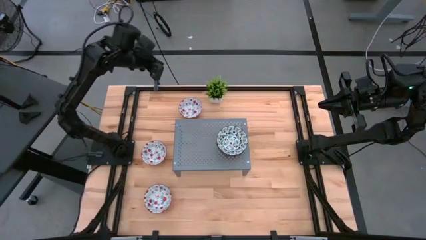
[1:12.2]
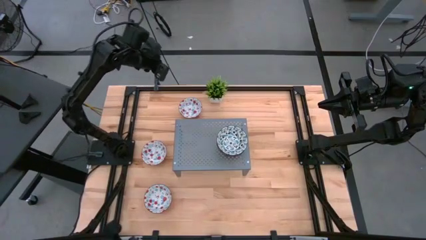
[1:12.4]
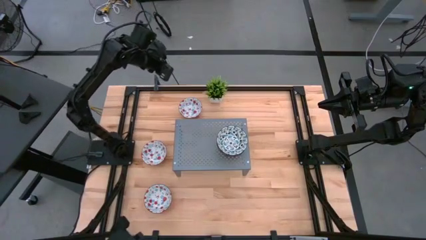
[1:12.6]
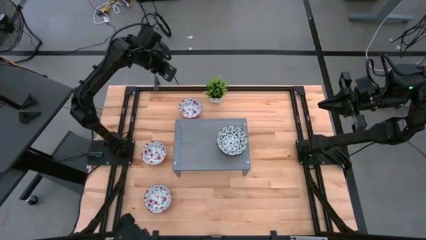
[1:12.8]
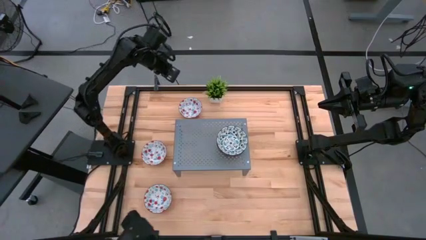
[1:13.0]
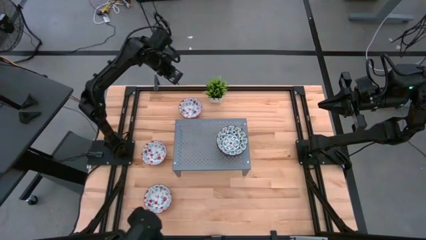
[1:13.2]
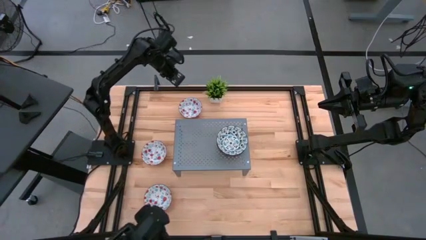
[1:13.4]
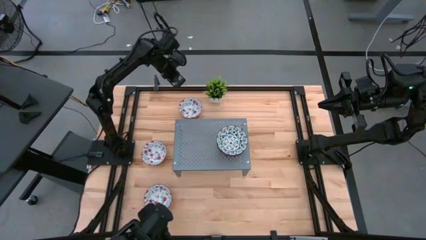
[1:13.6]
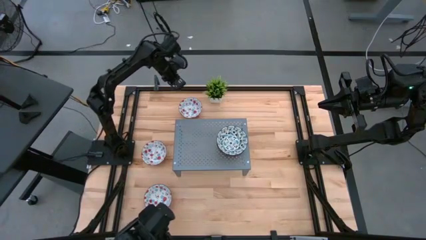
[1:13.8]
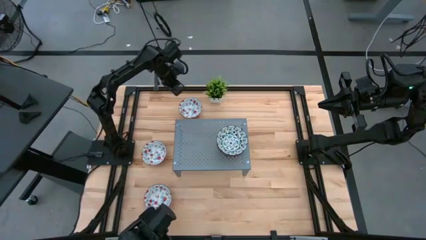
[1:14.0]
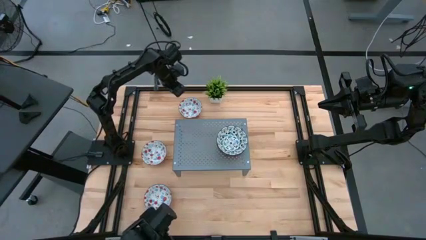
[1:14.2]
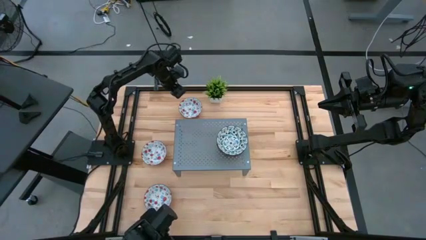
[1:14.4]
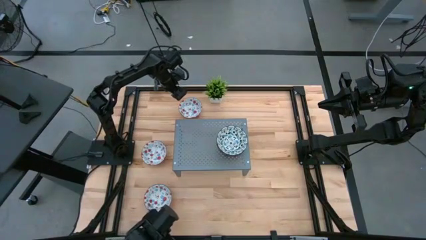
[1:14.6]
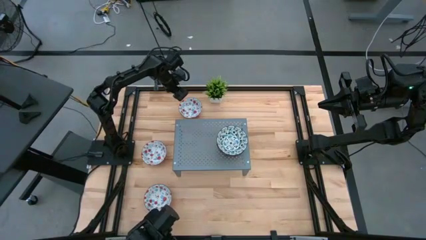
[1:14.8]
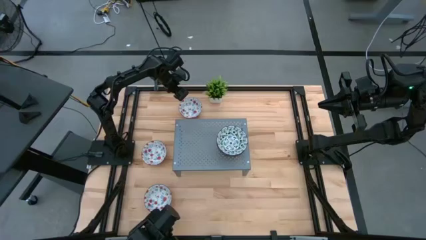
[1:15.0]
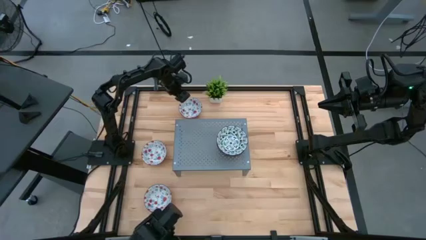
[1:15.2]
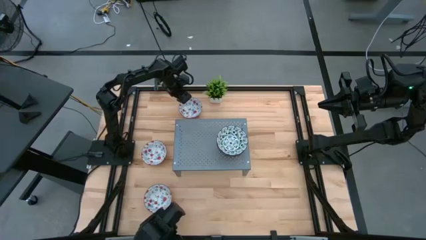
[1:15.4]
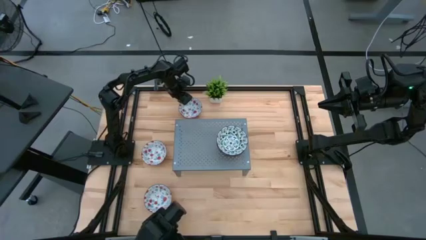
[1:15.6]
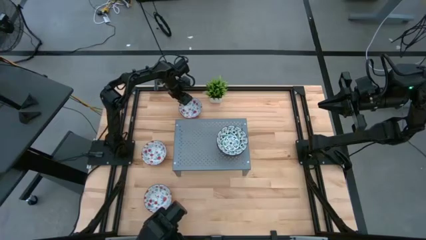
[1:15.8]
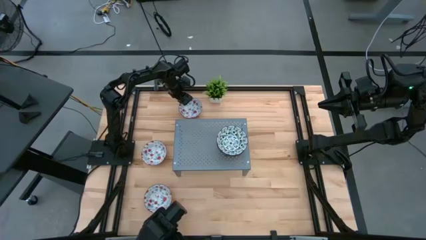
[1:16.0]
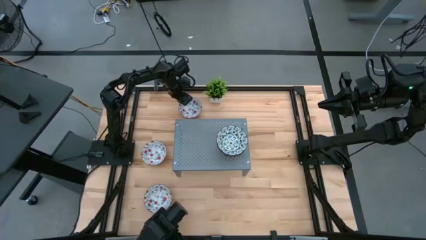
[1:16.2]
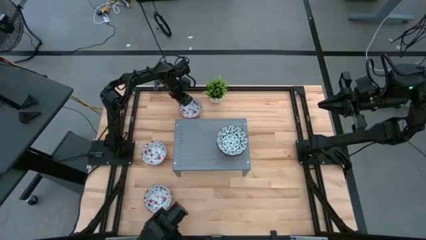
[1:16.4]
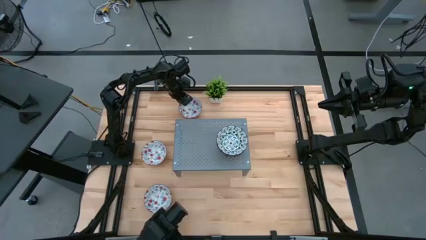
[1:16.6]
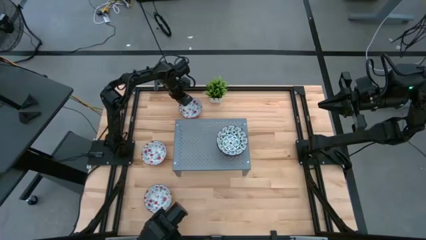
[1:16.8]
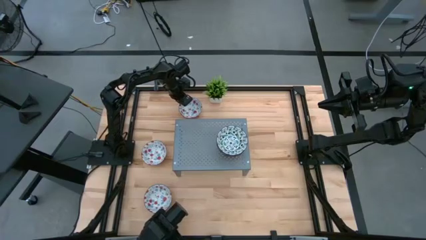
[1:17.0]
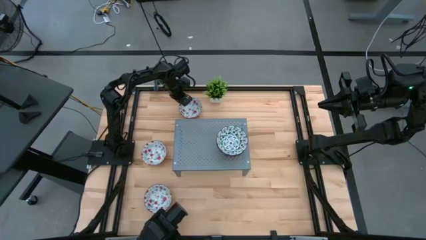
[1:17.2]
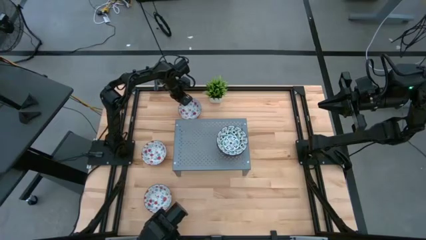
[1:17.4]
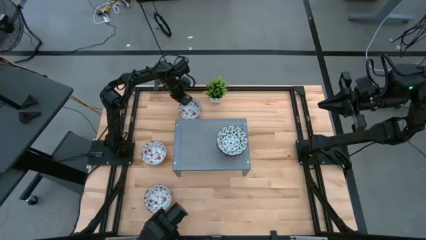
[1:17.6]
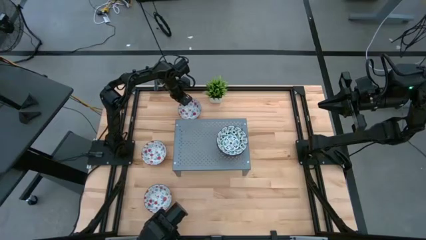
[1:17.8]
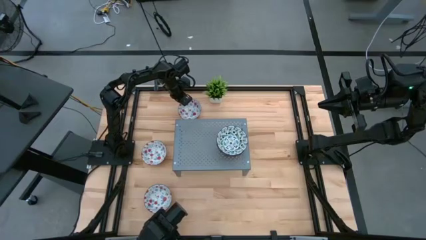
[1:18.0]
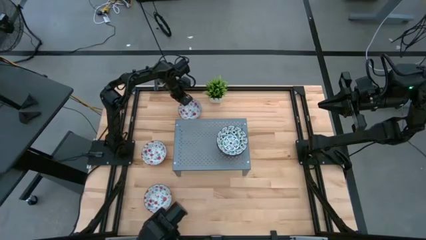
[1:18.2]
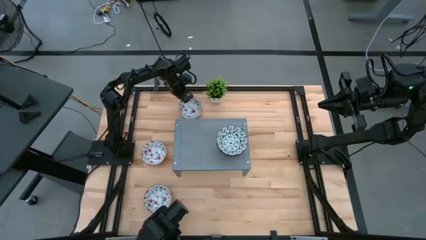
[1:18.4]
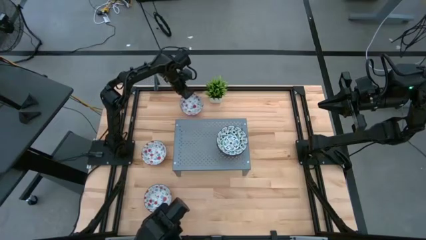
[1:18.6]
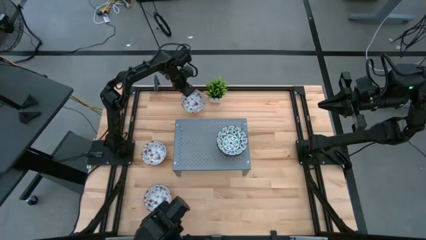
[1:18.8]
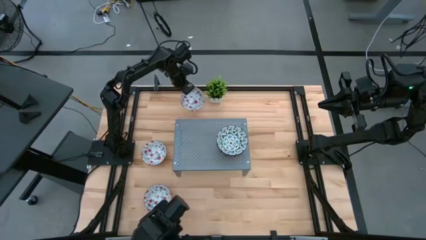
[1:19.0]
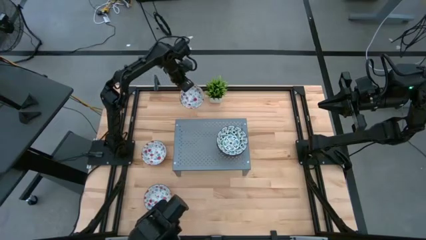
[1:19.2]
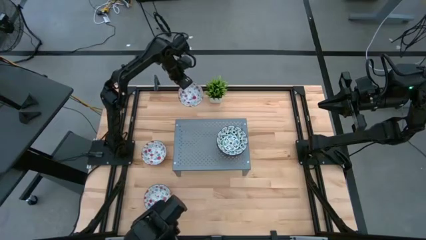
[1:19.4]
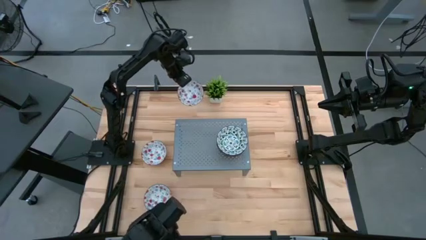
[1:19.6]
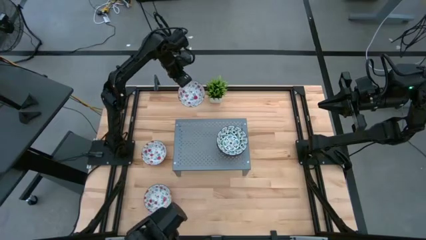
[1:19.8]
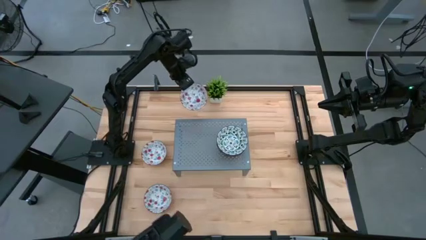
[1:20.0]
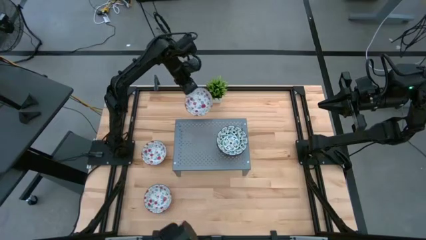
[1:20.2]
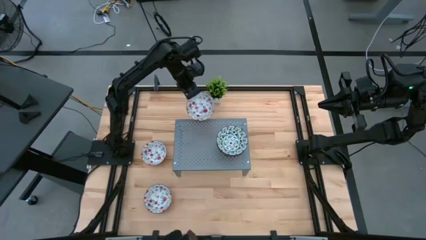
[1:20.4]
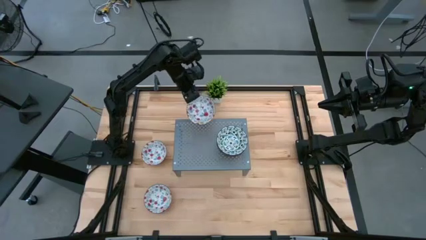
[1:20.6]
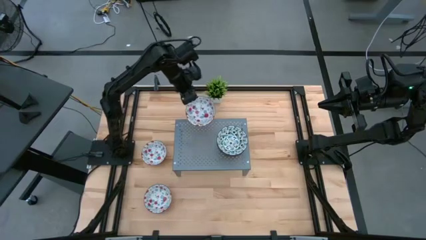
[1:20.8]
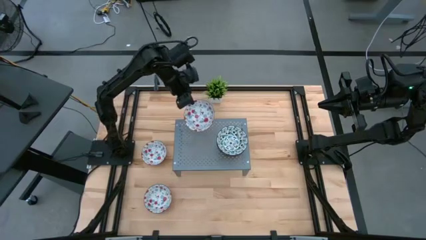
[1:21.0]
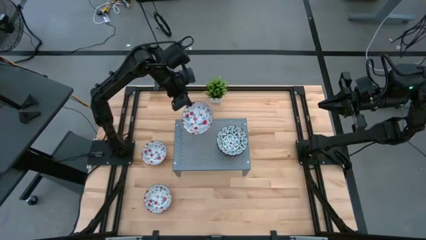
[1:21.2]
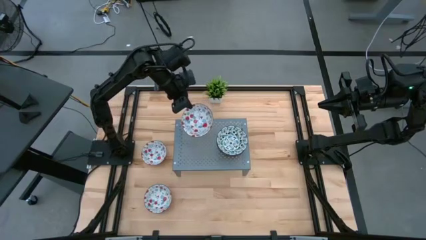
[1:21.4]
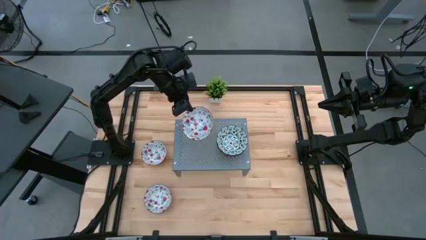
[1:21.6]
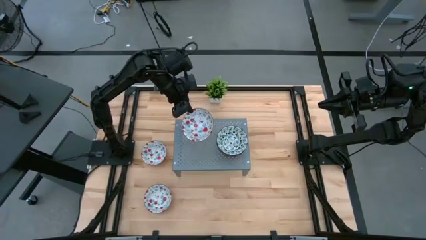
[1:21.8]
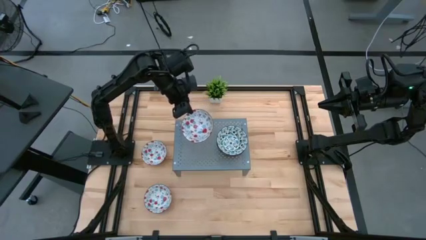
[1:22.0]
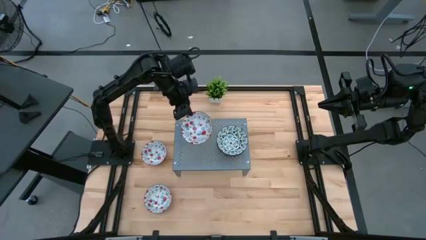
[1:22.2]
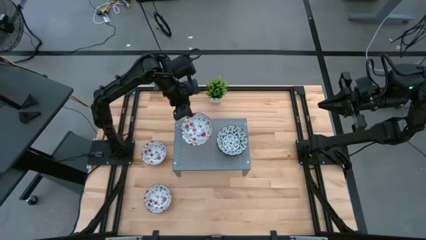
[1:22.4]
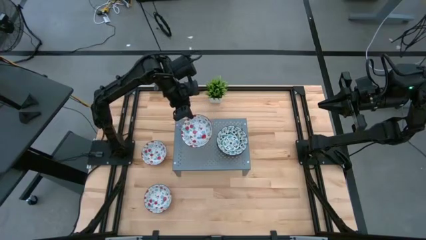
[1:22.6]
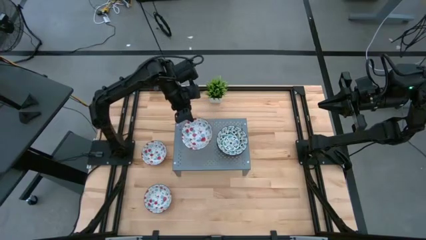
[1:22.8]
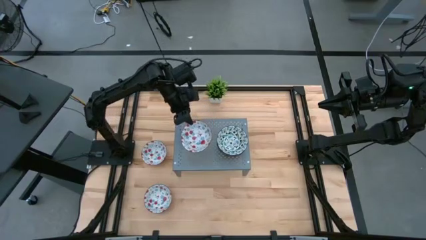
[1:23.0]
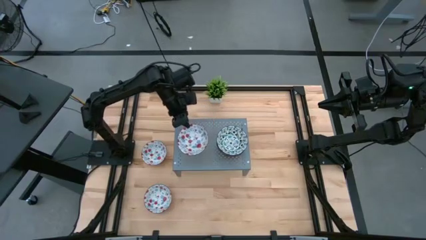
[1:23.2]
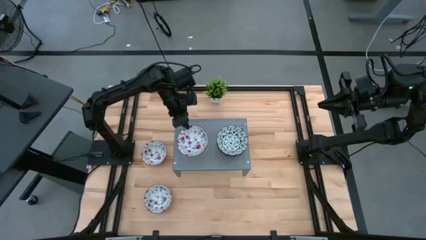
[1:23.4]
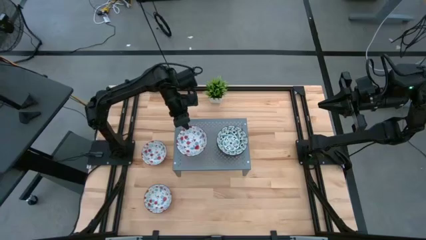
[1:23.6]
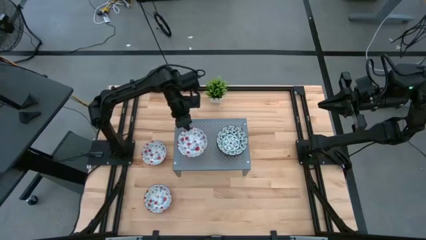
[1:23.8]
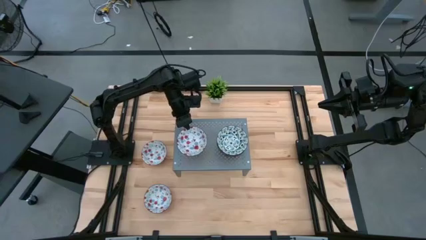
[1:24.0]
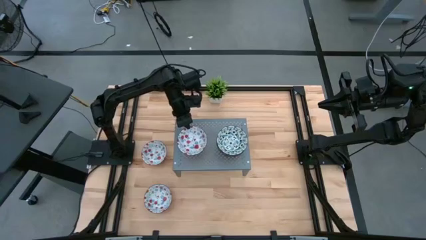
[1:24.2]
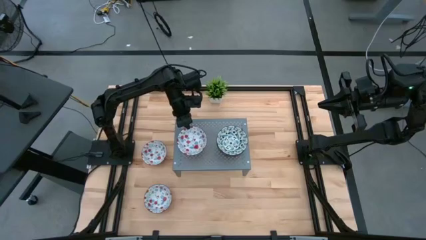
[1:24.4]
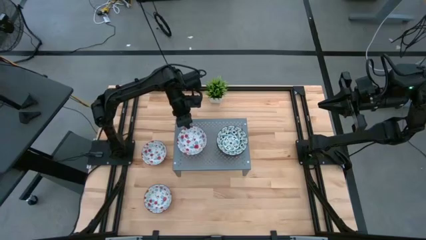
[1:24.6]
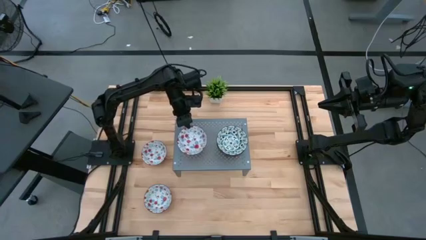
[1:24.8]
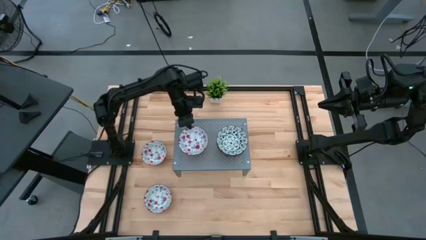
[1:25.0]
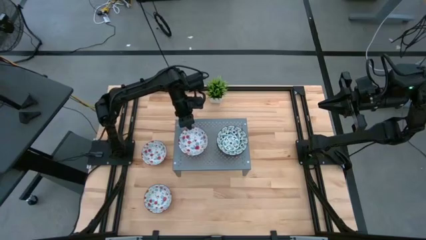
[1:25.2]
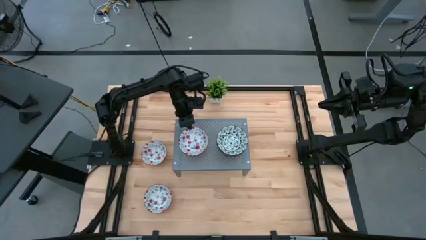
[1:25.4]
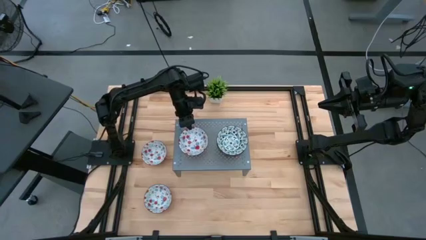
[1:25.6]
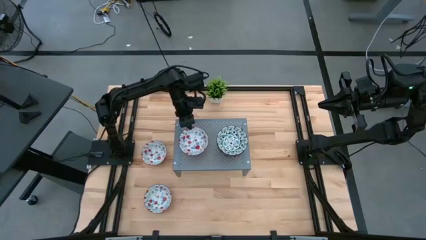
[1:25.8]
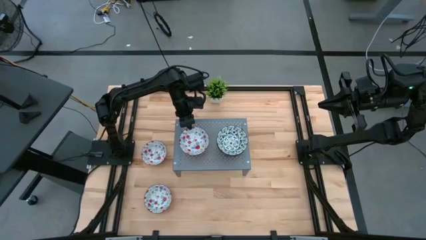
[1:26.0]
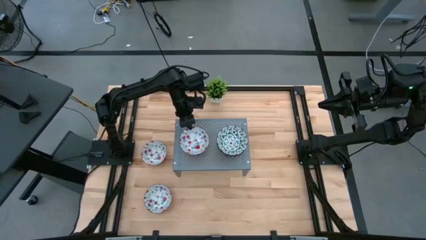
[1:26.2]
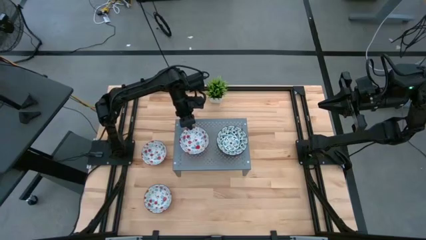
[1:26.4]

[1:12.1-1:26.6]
Task: Pick & Place Mini bowls
Put the top red patterned bowl on the shelf

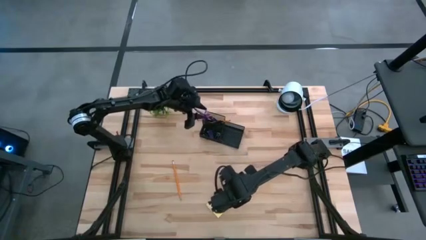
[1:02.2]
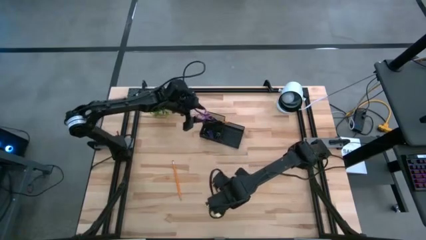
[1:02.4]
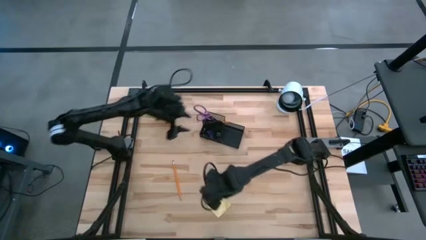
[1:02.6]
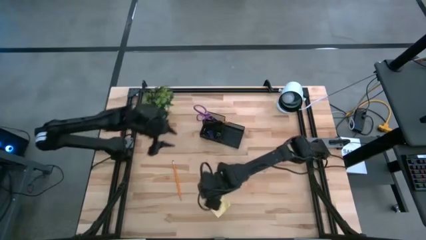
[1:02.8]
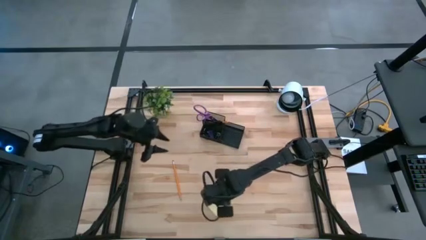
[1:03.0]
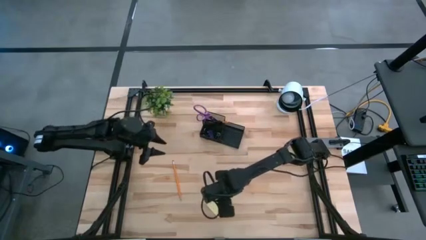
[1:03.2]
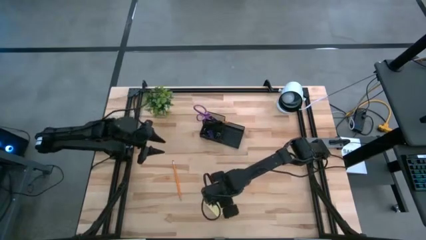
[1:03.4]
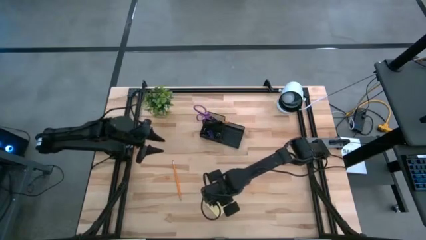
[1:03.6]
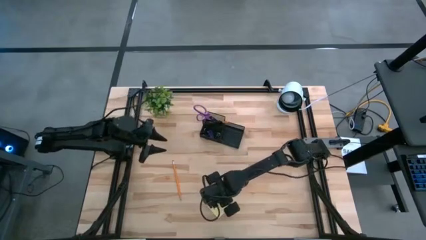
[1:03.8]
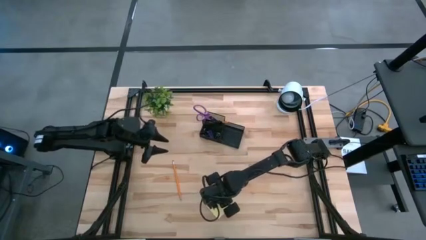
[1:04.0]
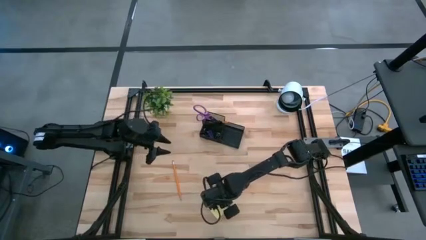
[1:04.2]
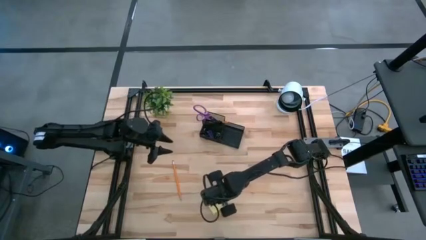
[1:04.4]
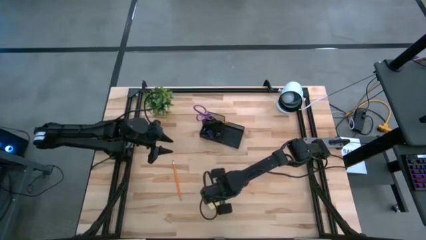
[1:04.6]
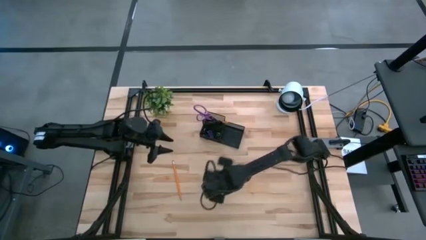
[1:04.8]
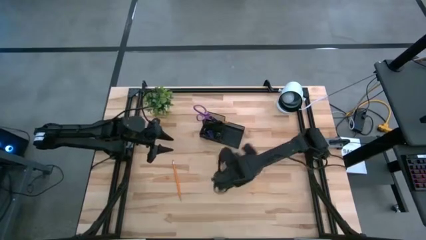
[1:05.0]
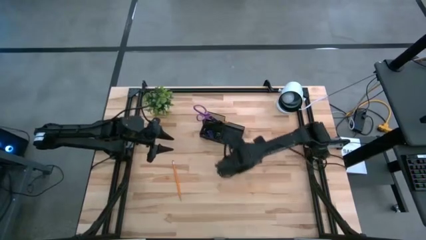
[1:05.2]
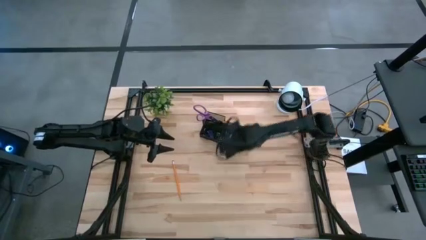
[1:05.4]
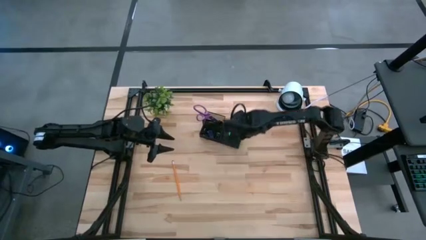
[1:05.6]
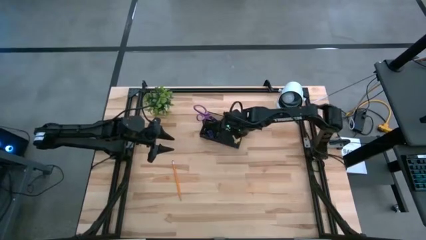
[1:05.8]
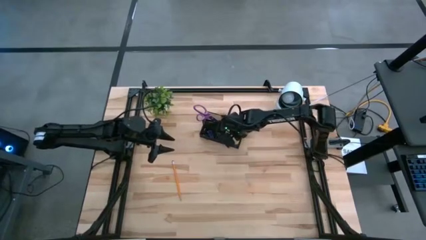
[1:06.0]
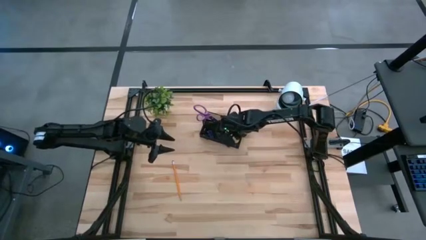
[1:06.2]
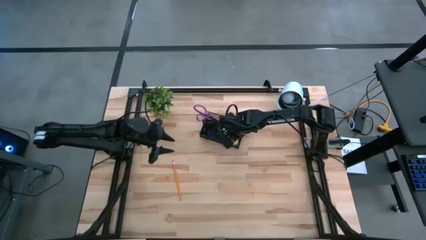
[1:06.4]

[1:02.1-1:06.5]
Task: Pick and place office supplies into organizer
Put the yellow sticky note into the black desk organizer
